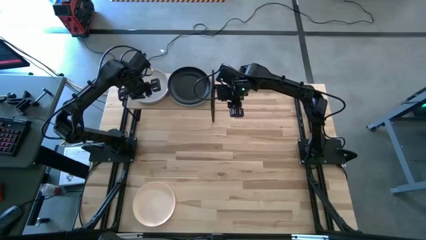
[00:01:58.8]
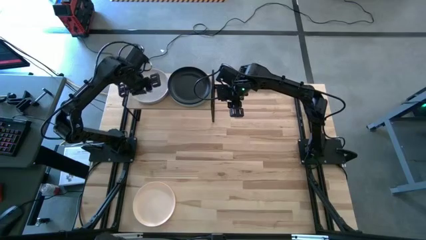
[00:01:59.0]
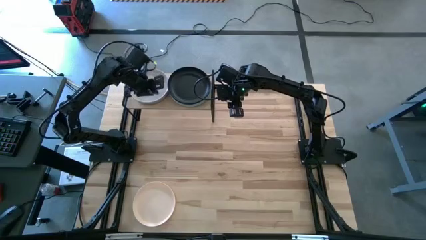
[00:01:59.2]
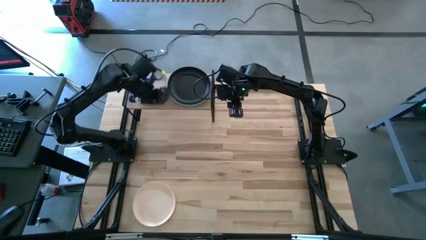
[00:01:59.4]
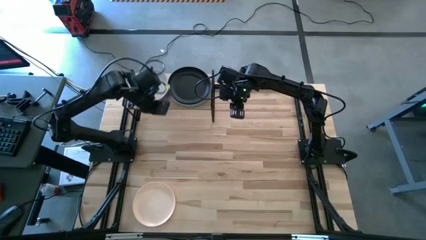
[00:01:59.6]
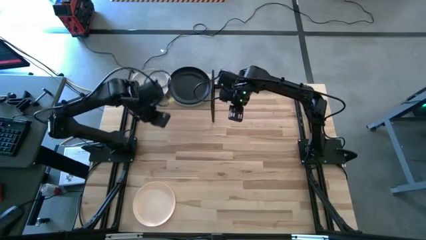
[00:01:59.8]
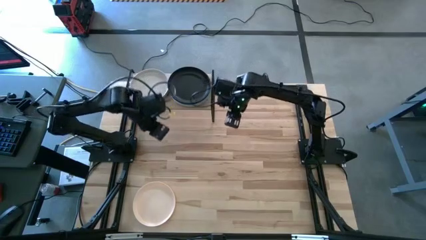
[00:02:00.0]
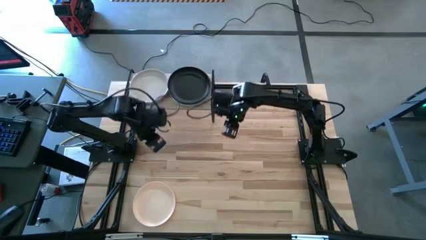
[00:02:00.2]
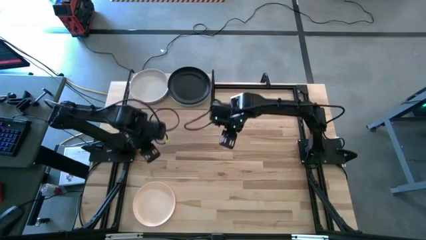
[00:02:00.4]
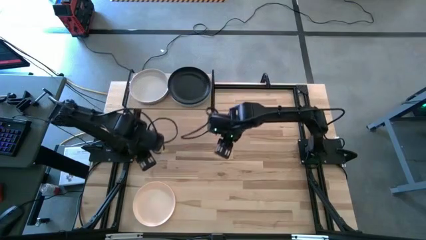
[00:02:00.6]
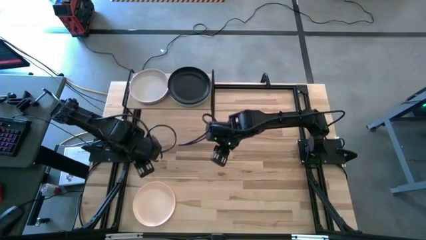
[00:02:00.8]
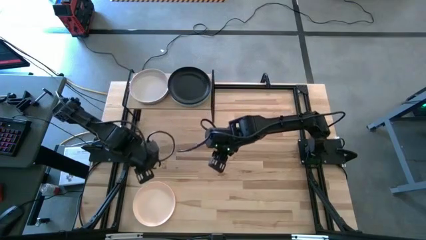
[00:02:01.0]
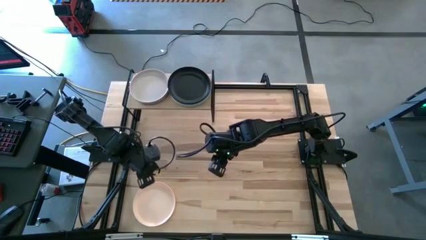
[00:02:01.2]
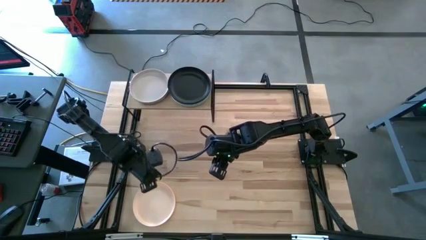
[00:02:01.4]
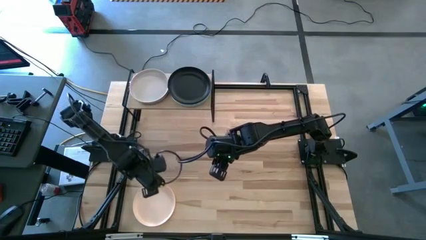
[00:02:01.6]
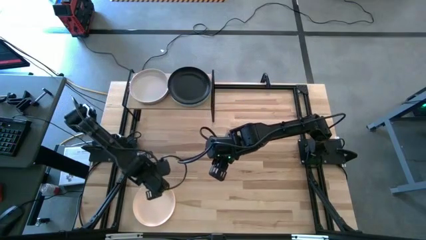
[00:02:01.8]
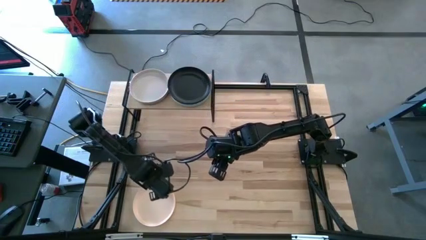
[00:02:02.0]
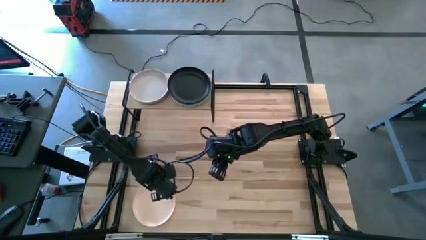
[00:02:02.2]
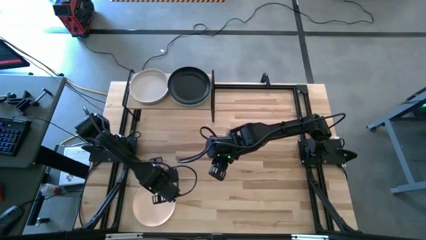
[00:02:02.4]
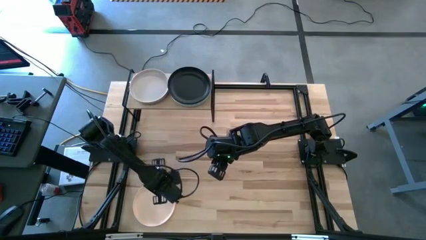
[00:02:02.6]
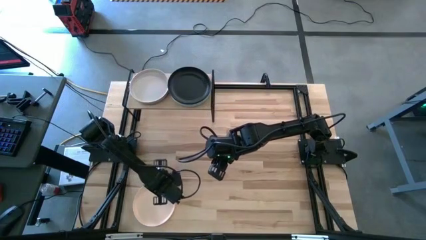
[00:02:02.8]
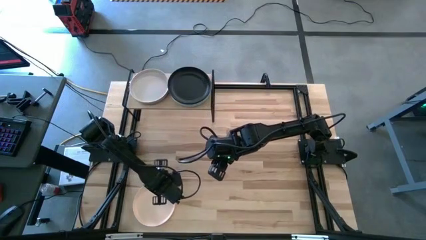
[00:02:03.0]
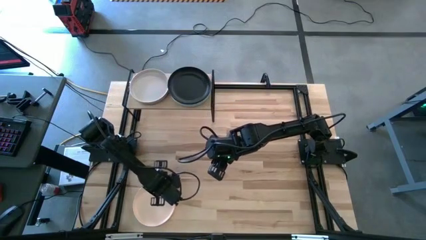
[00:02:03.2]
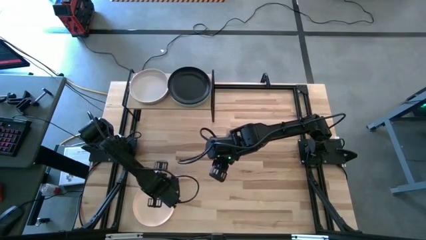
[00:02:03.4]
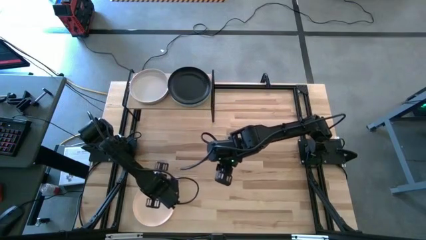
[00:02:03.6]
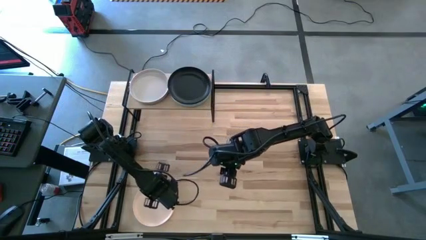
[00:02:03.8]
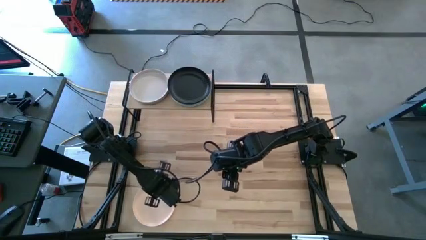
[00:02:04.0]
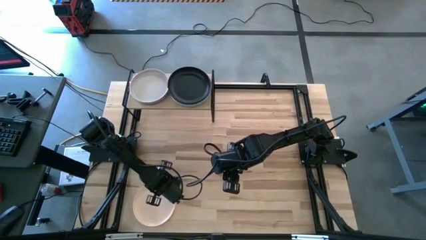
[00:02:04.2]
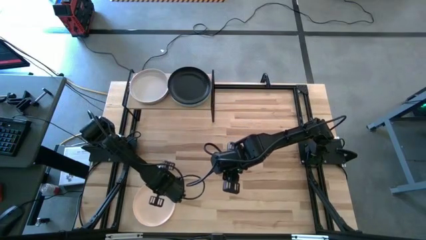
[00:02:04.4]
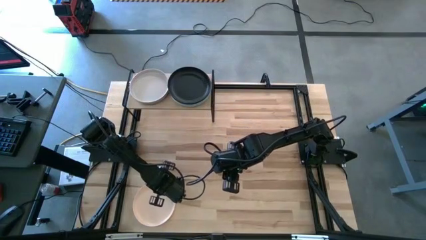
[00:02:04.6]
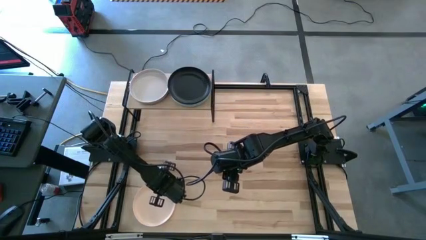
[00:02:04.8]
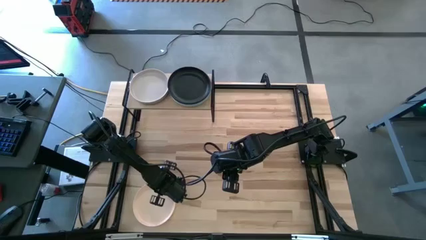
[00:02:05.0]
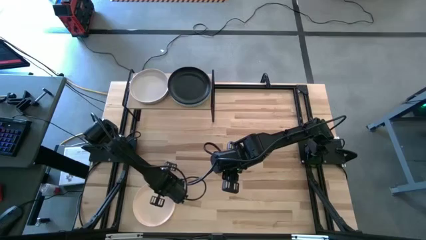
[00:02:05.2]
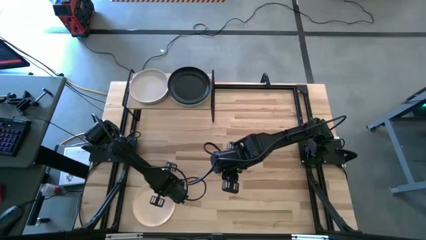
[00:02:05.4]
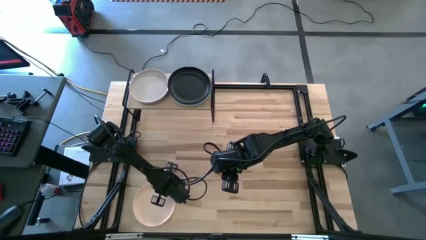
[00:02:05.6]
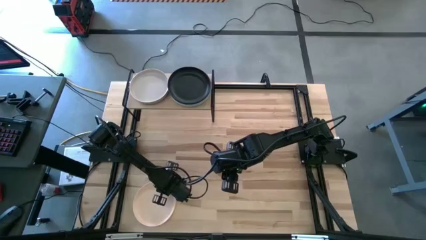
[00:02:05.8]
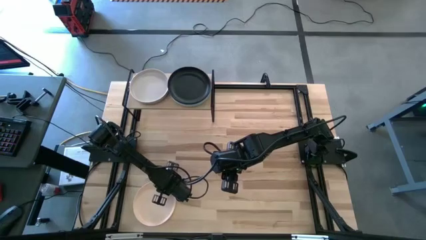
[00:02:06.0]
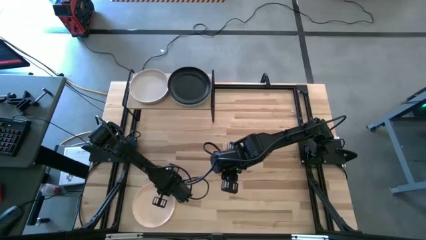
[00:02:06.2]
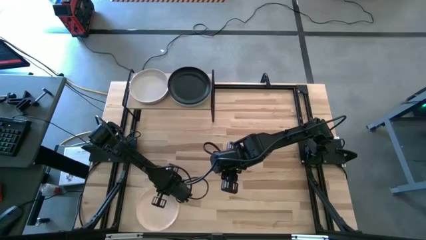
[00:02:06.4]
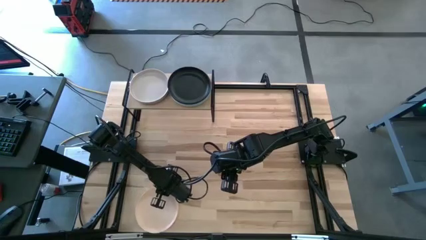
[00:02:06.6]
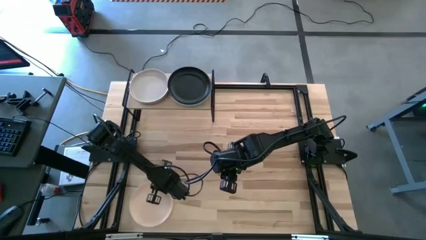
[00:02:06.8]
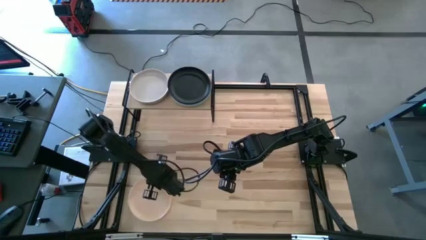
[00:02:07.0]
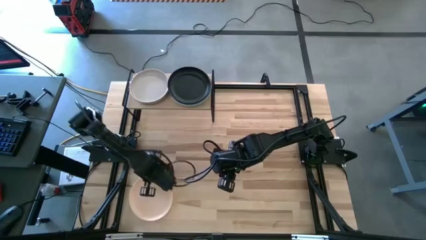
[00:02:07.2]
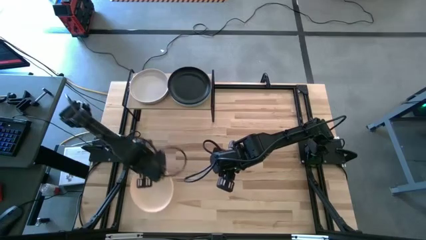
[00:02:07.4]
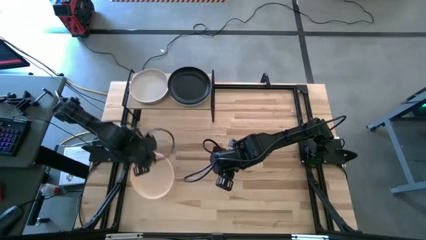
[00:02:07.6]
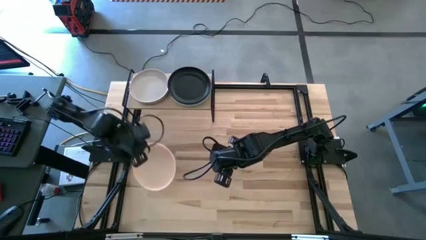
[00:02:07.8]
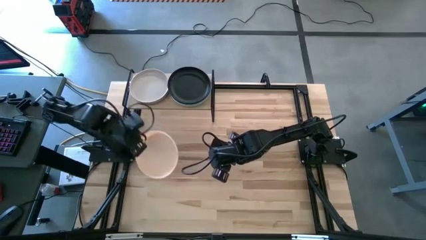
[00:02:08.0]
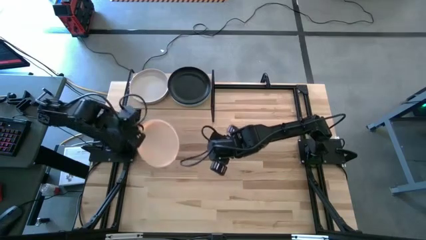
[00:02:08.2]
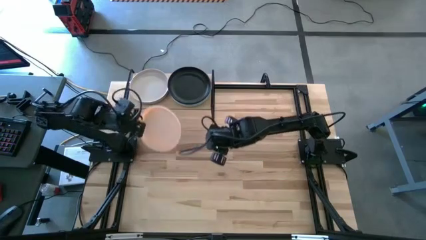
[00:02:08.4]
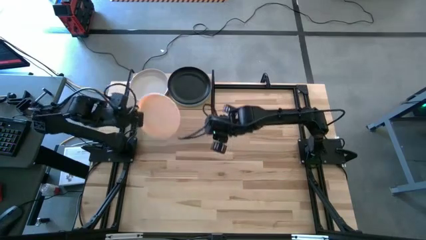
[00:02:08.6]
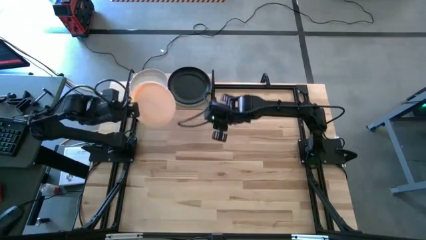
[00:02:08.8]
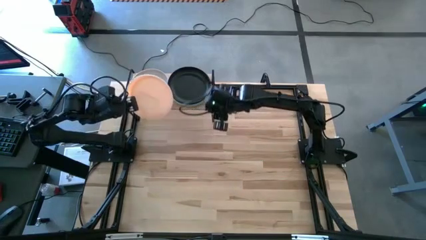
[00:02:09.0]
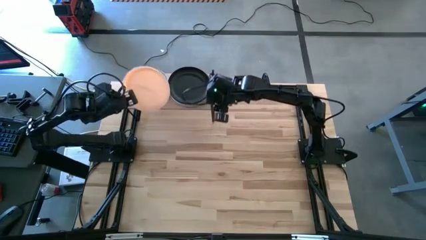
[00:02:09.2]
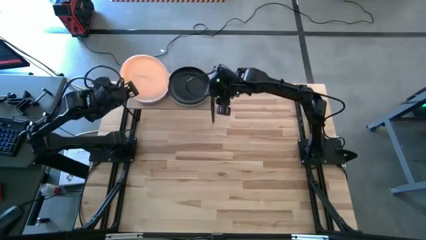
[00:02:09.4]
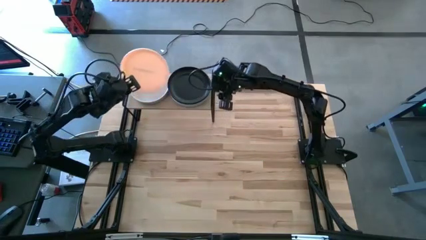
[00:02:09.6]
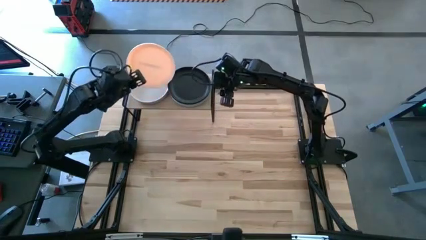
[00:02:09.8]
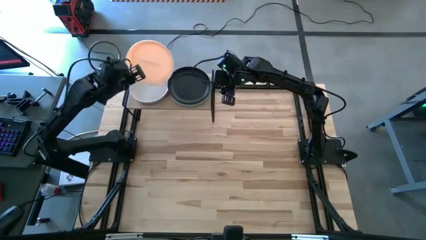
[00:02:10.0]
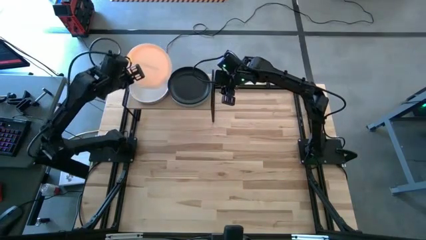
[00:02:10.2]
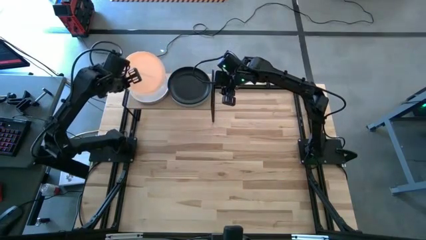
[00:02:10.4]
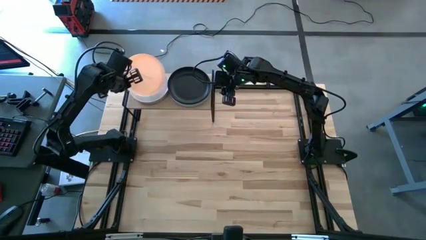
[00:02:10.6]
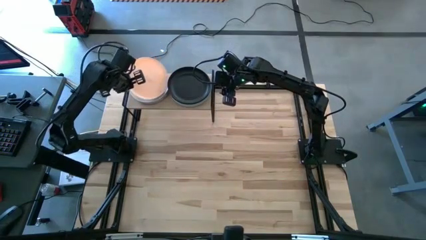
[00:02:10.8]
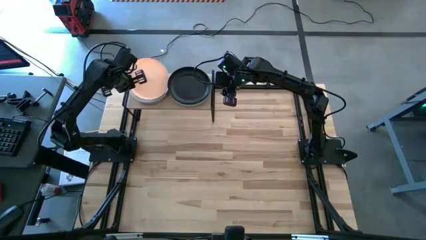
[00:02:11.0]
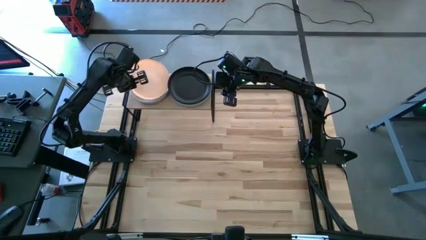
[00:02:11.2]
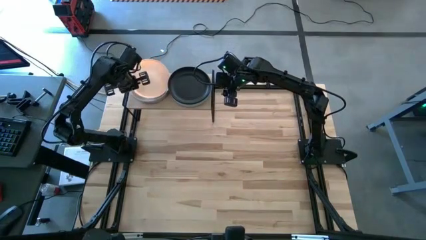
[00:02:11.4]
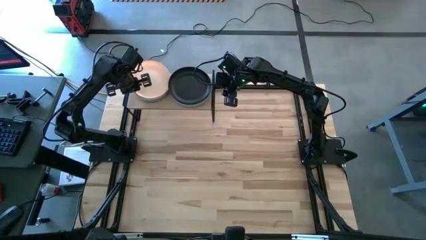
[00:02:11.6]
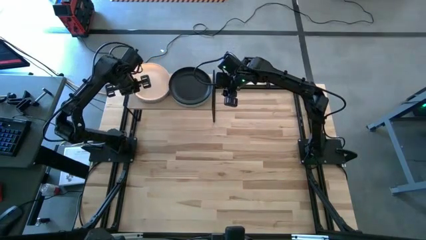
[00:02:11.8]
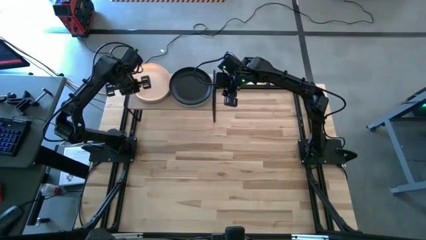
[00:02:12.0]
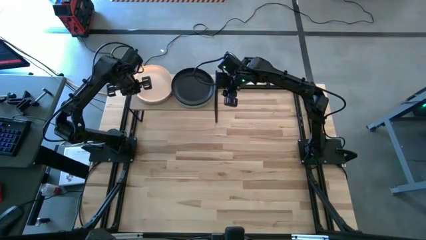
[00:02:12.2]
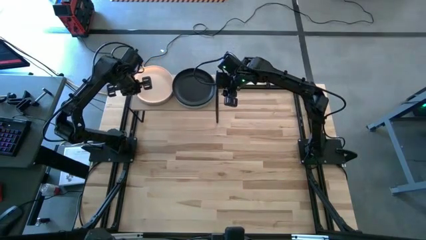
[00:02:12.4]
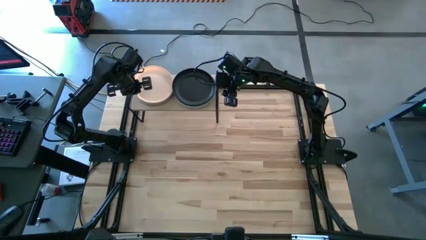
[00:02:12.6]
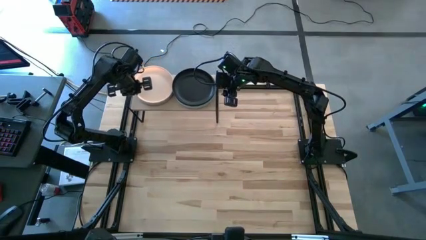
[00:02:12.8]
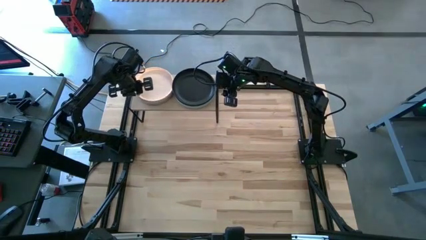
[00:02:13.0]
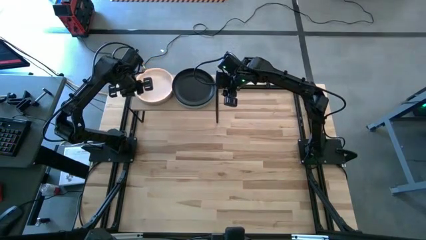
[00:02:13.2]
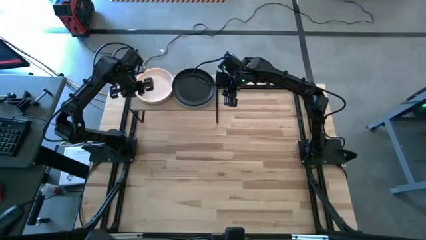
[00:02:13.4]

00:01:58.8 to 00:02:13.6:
Task: Place and stack plates onto a shelf
Stack the light red plate on top of the light brown plate on the shelf

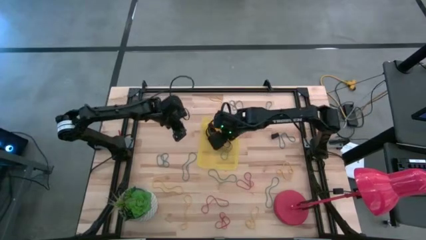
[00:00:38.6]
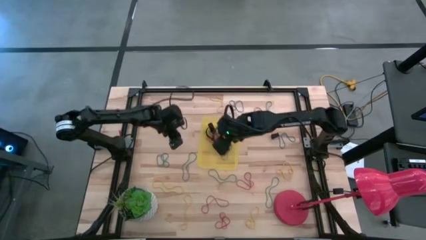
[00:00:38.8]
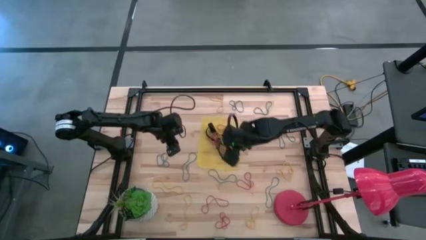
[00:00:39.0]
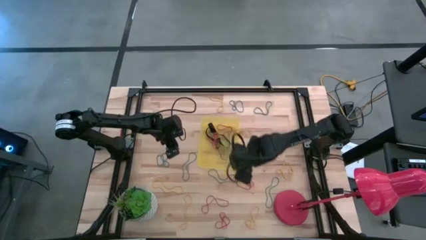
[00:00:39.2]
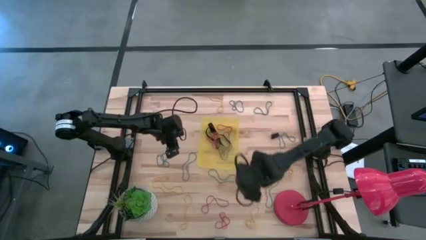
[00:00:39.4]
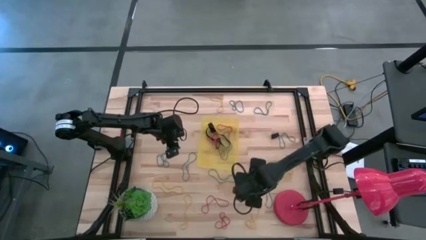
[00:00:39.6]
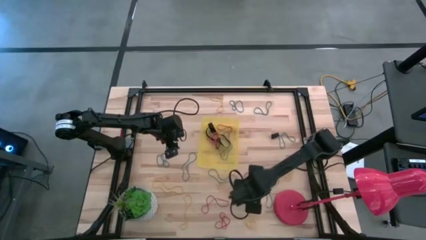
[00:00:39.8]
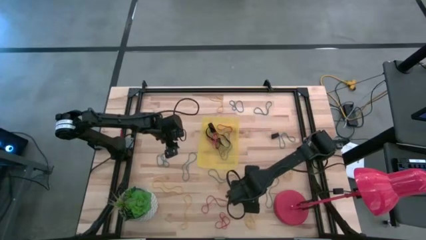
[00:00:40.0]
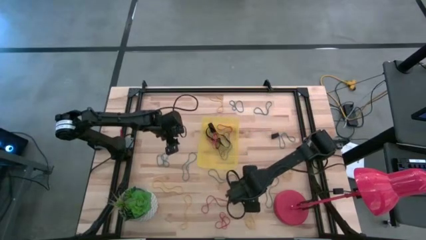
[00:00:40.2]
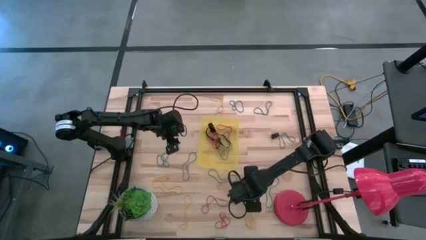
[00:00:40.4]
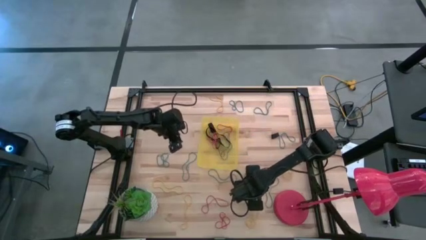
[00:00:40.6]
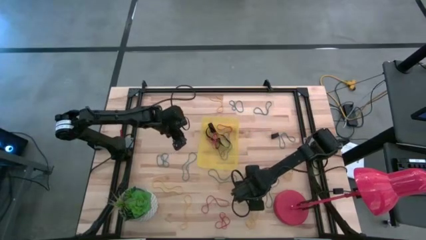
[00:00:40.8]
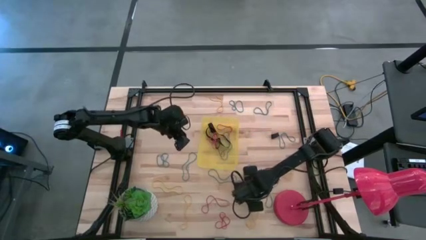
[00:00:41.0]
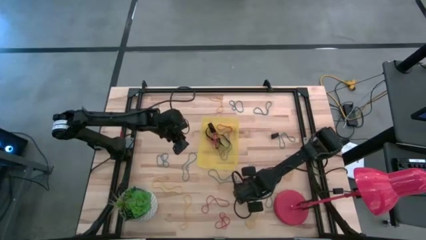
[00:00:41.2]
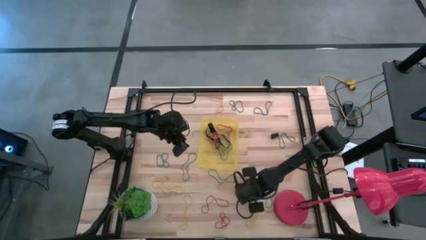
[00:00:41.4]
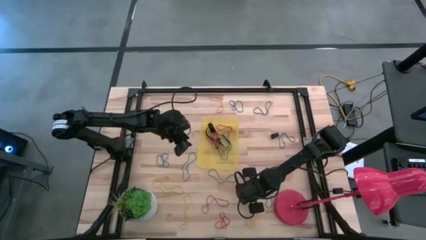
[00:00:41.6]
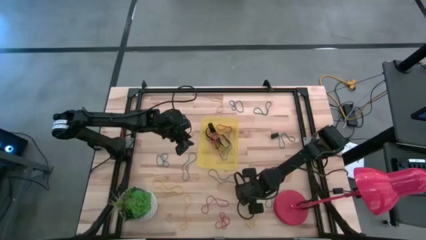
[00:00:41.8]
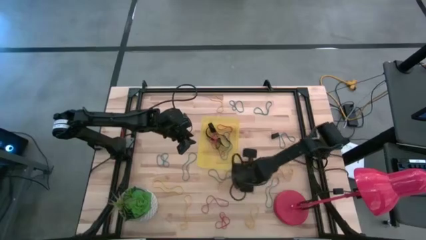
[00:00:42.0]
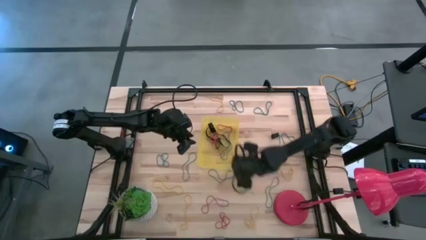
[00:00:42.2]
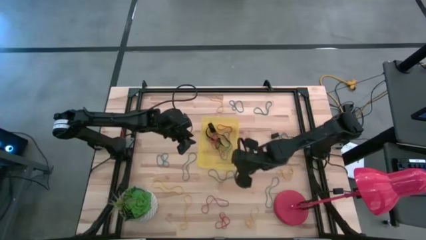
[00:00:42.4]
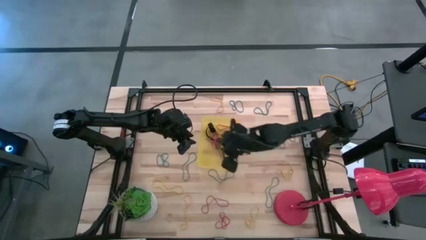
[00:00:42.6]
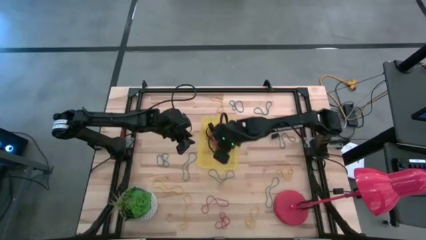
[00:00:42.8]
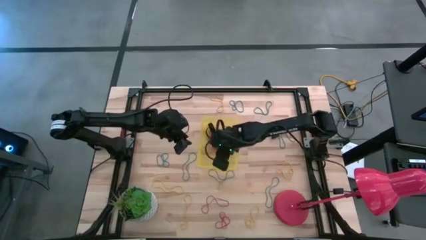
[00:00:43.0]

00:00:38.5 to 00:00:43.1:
Task: Pick and place rubber bands into bin
Put the red rubber band into the yellow bin
